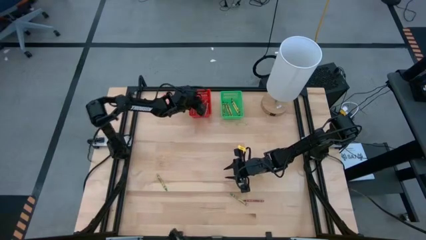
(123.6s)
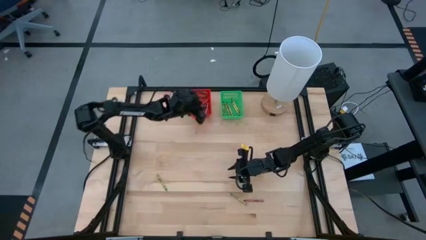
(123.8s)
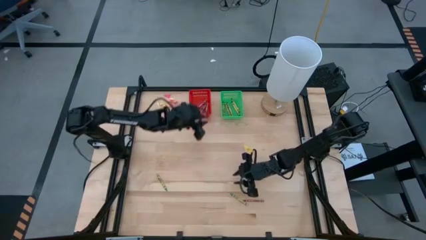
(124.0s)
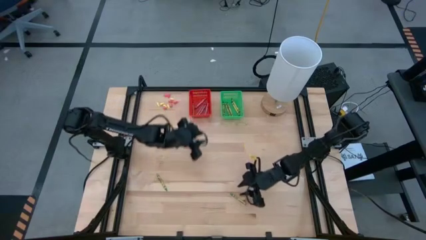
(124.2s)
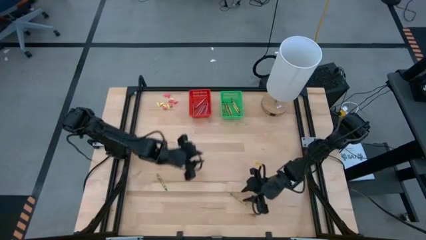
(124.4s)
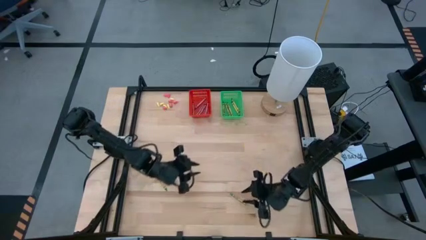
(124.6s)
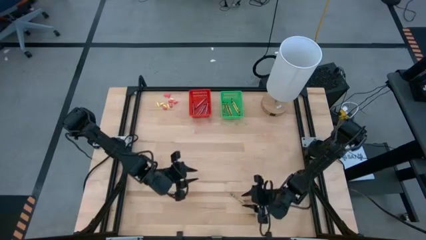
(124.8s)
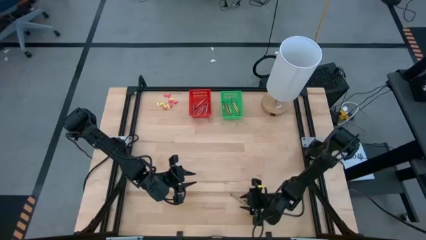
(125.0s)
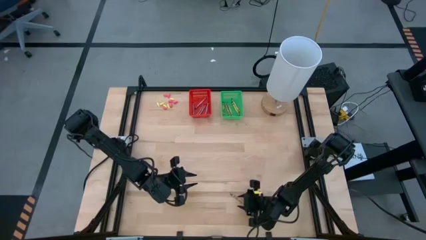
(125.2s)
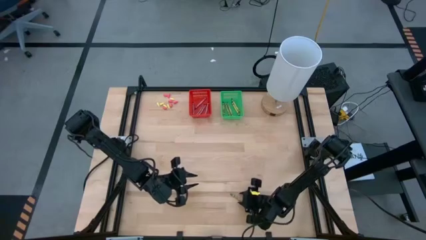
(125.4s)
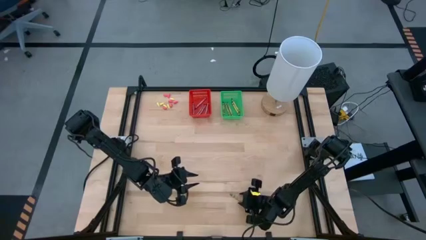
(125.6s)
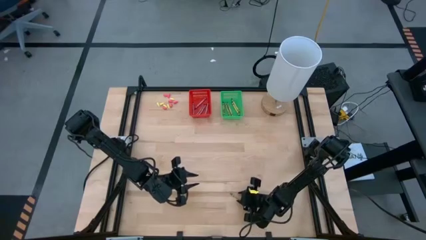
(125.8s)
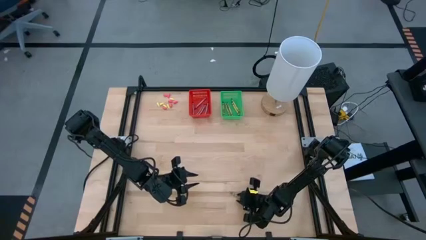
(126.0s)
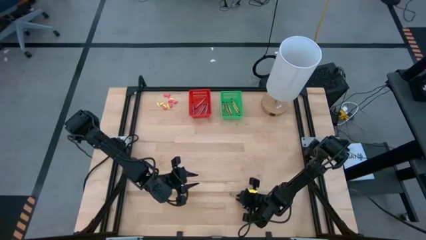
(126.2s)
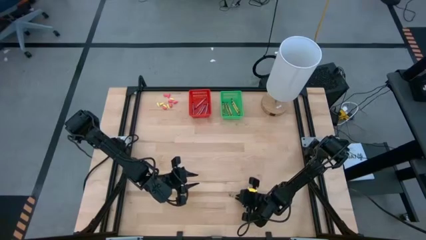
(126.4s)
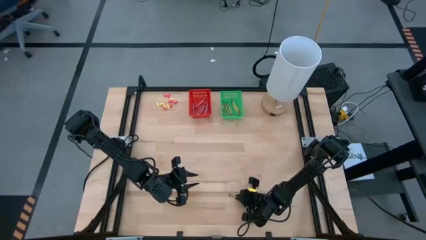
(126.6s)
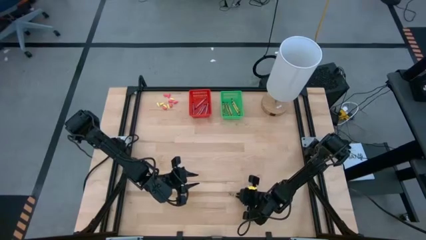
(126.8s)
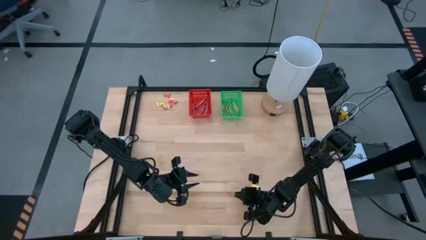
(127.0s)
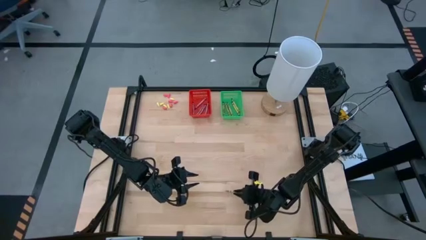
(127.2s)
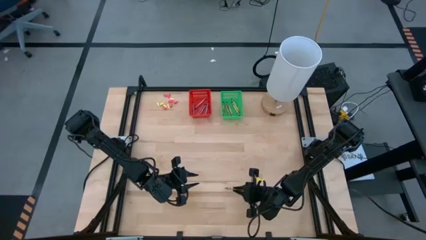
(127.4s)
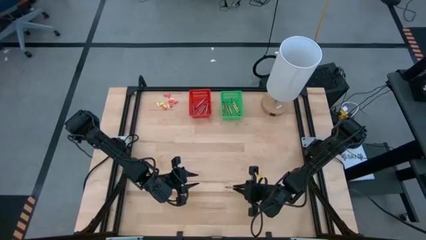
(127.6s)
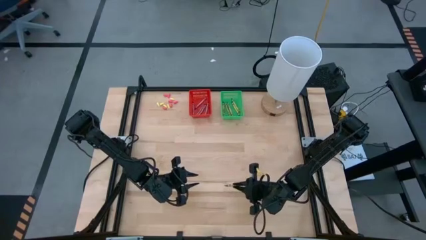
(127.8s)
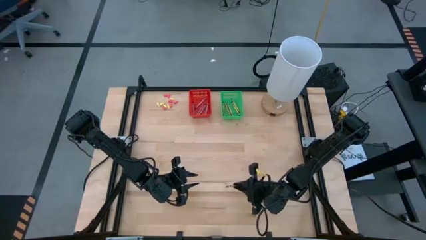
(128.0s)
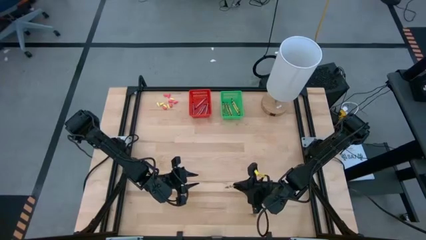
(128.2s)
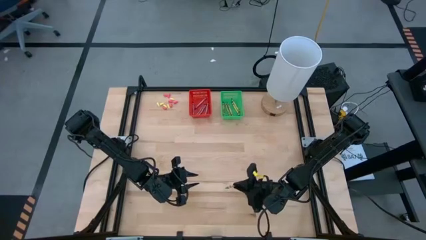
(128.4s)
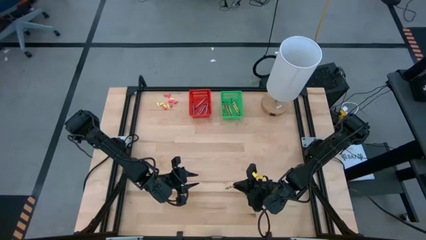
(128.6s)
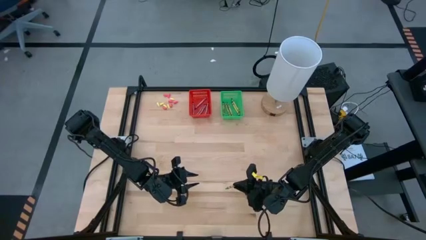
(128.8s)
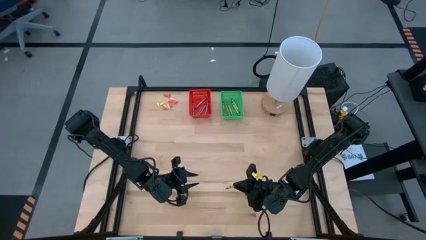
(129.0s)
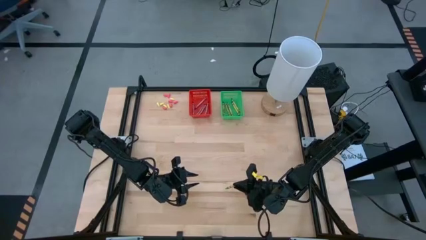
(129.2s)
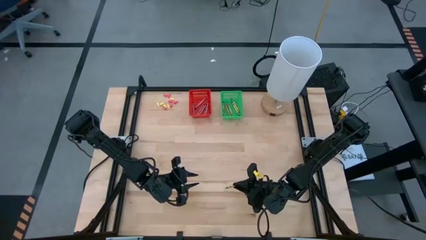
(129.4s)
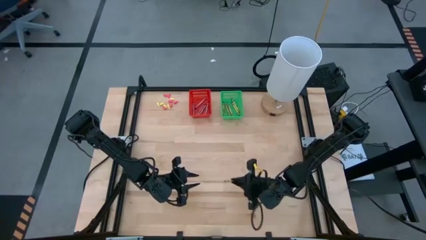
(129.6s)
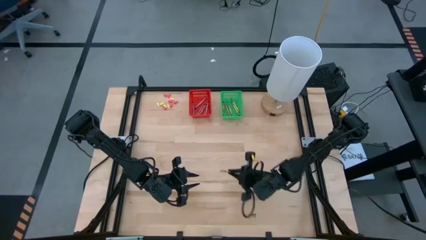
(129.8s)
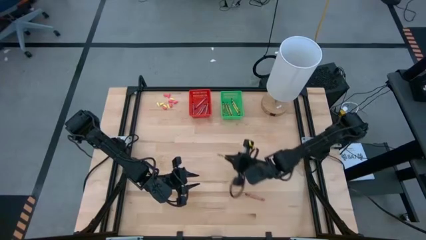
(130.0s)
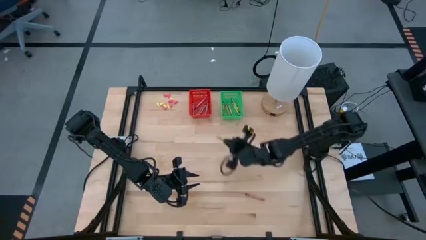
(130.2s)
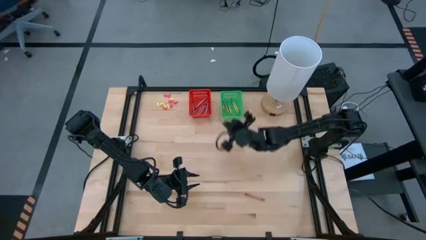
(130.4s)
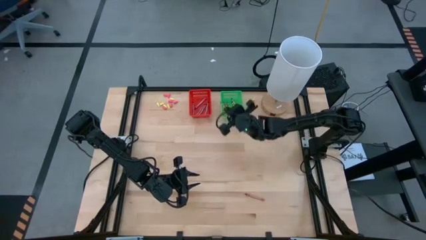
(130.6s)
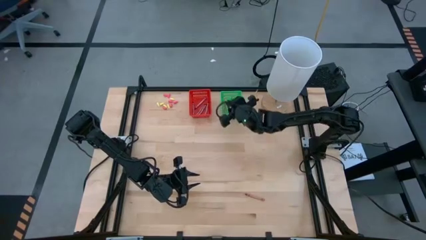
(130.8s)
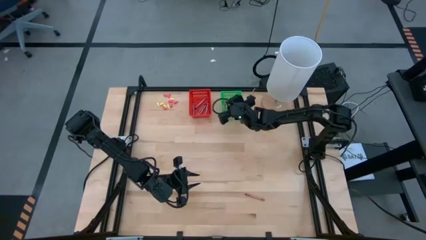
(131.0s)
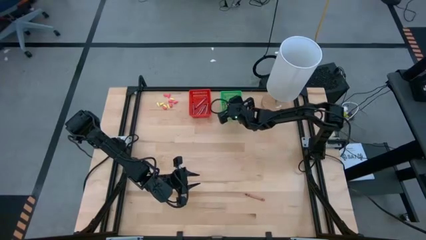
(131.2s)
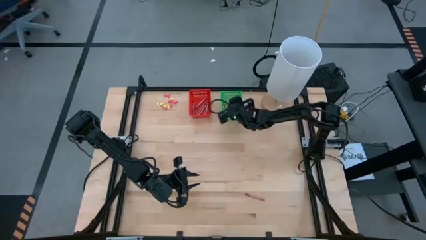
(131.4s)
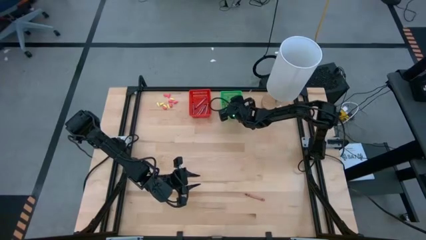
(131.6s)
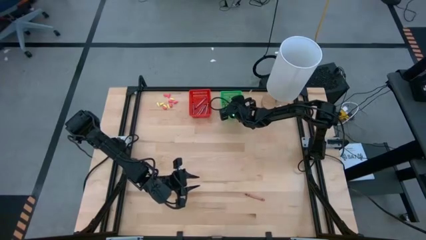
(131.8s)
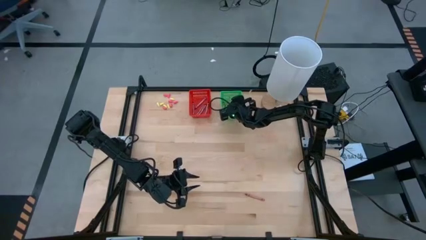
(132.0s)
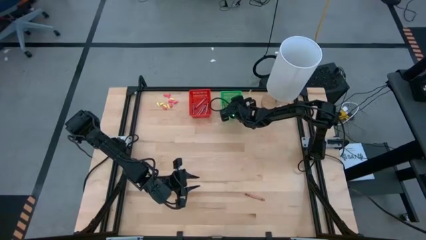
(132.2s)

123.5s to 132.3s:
Task: Sort crayons
Put the green crayon into the green bin

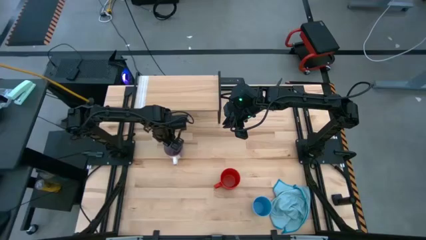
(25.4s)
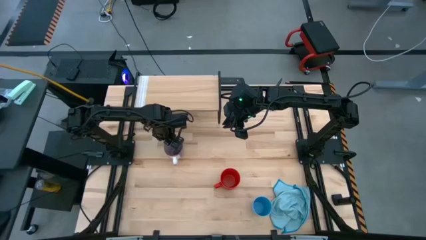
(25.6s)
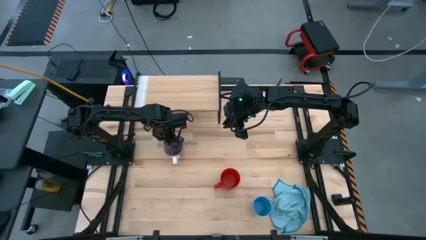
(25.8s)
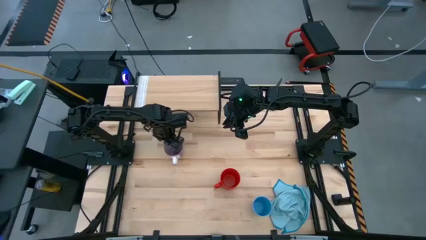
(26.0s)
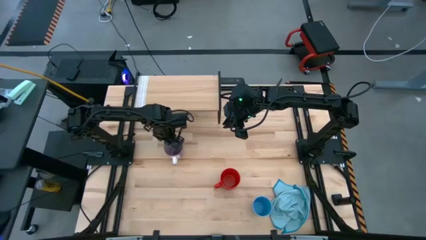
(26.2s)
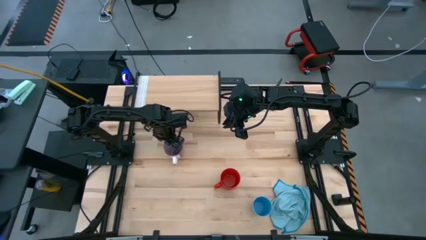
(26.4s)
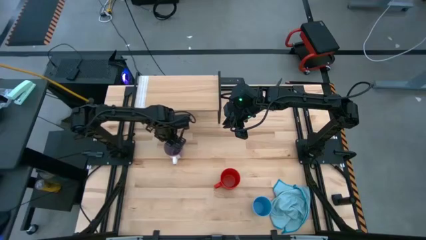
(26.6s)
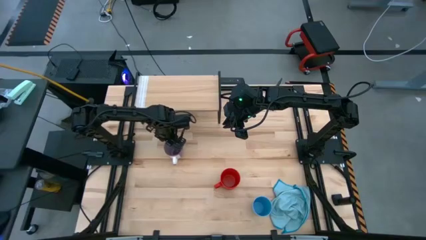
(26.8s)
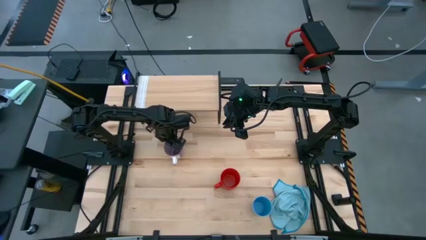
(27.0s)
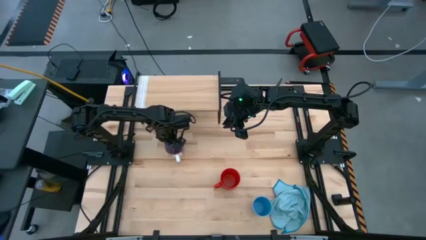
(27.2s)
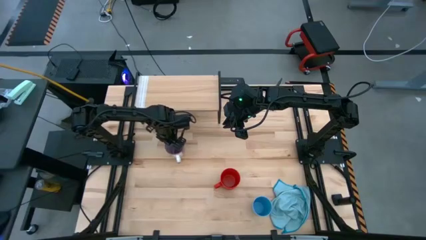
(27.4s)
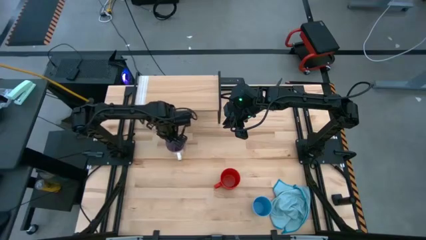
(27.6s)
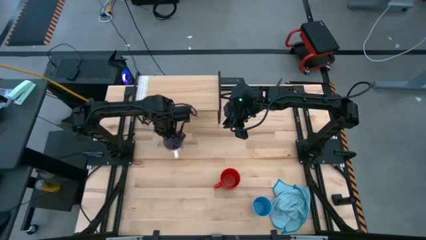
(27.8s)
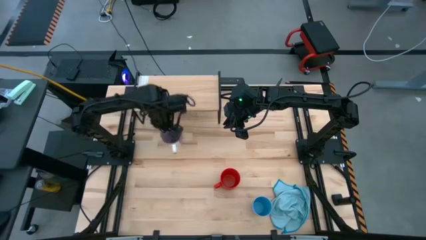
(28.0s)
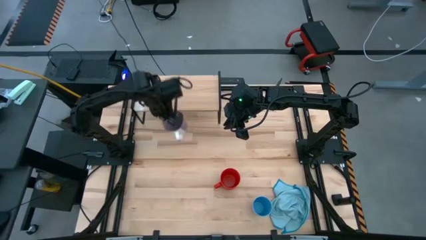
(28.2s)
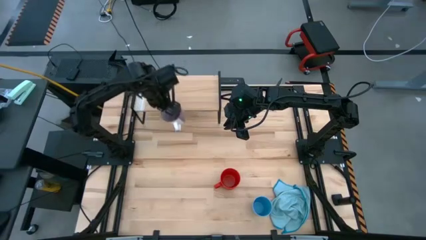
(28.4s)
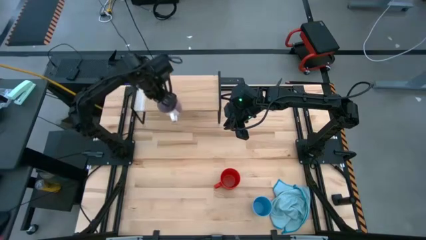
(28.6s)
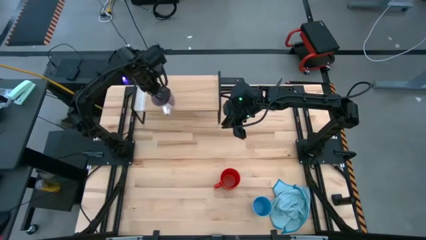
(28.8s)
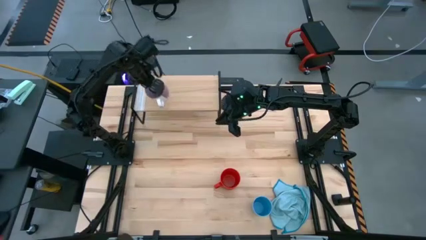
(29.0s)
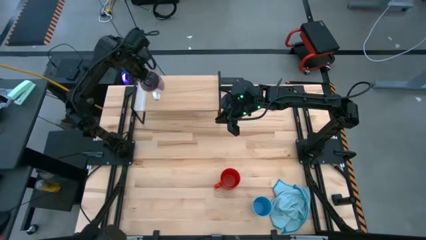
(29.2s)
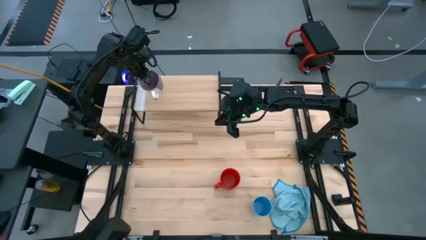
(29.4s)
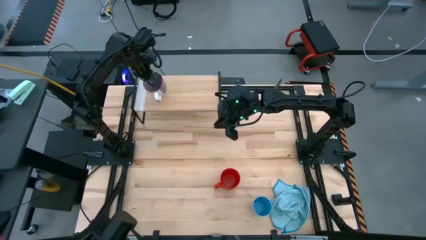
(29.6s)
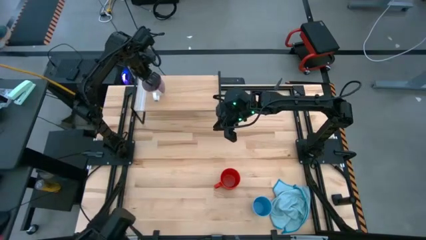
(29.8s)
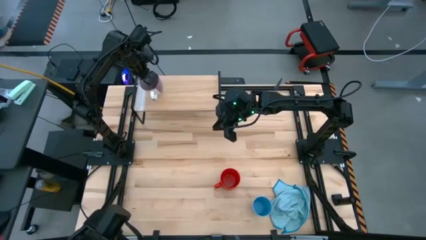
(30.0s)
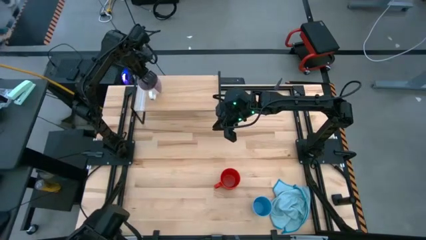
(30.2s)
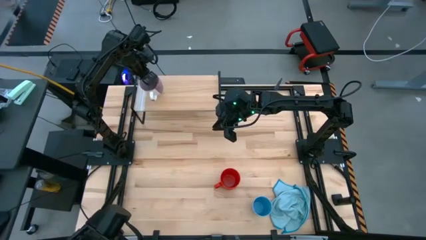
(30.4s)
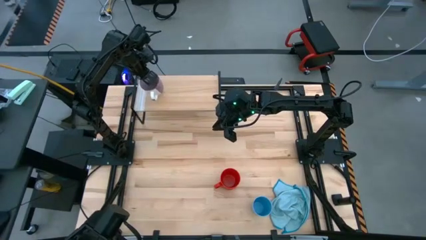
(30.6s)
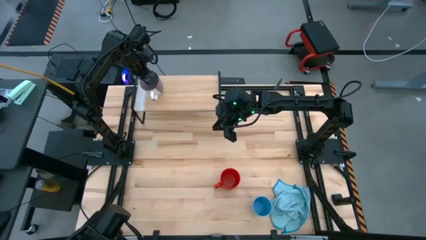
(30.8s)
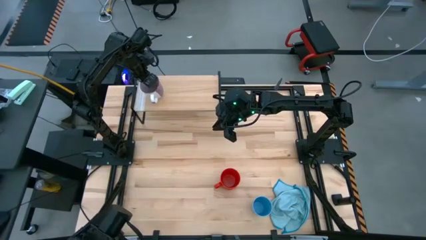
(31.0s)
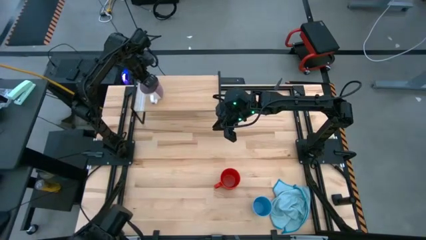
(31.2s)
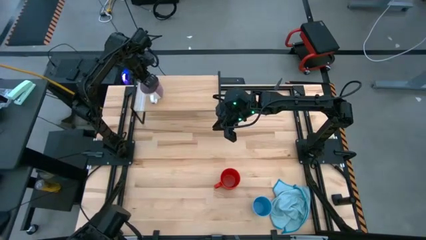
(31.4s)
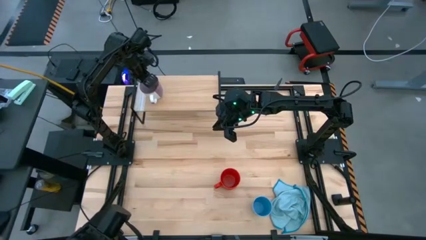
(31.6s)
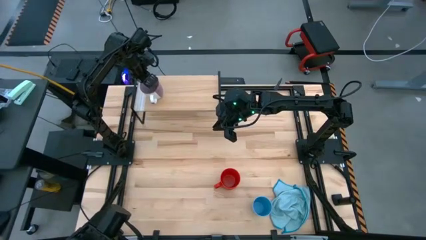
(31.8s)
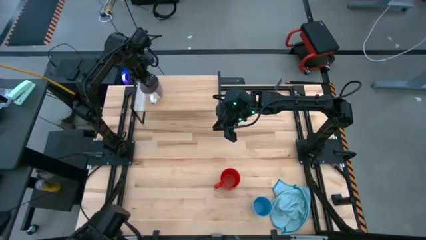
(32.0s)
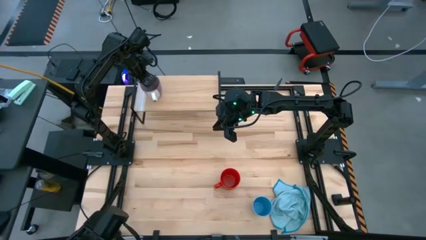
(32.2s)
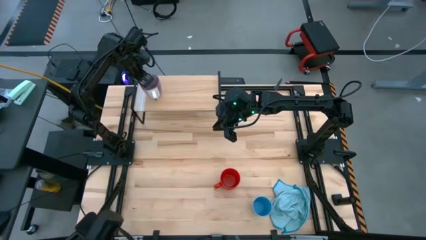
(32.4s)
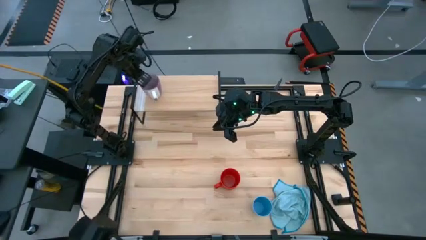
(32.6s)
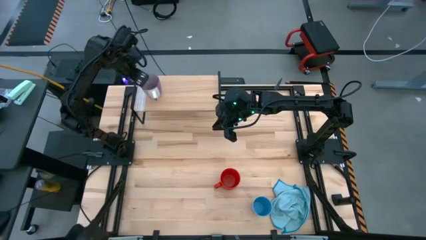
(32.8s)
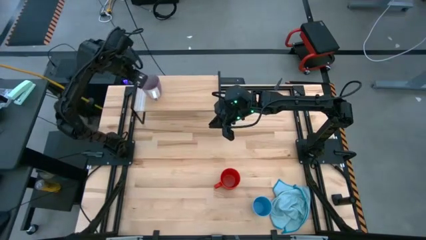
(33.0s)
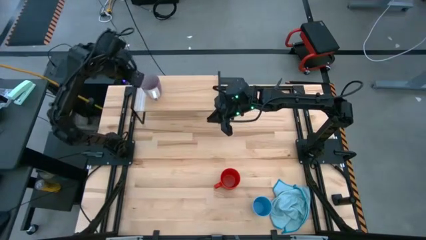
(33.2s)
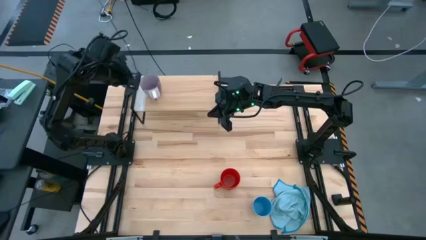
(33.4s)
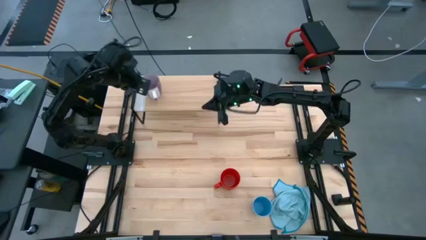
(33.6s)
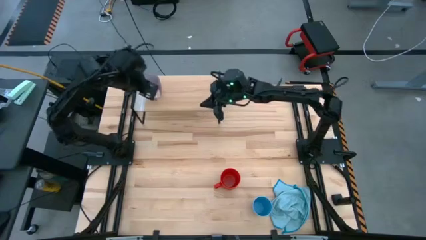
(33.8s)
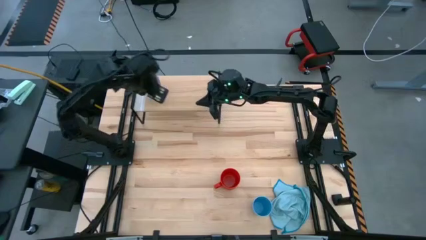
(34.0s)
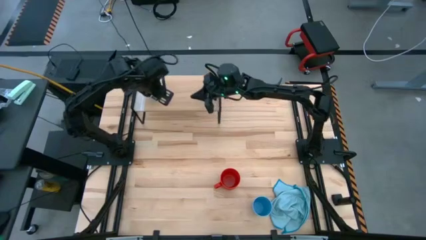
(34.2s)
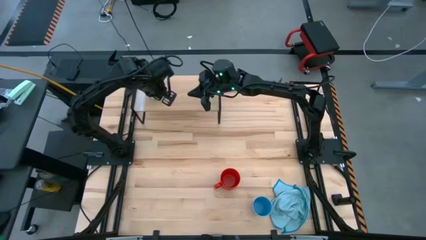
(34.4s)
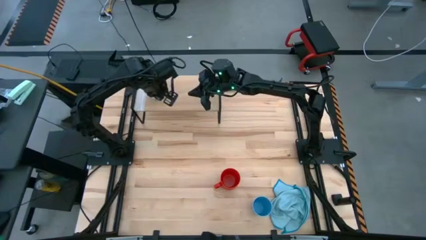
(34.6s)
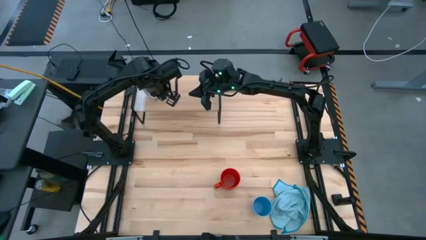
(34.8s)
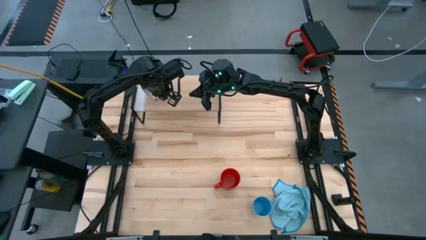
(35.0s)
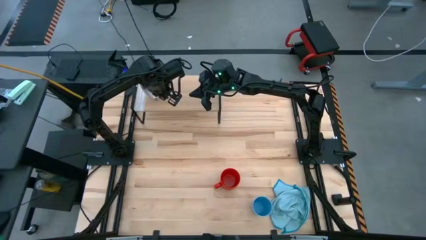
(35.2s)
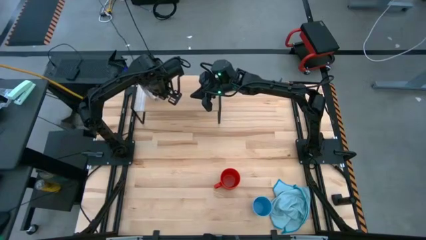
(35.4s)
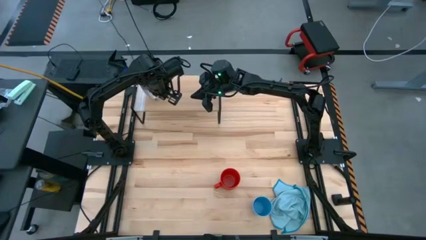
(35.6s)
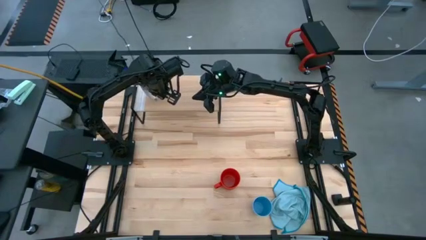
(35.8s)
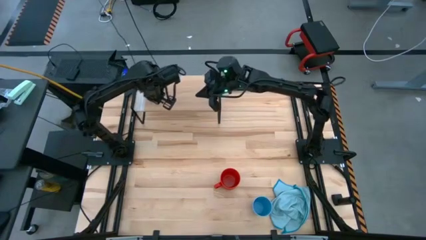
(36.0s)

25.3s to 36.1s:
Task: Stack small to large cups/mugs on shelf
Put the purple mug on the shelf
